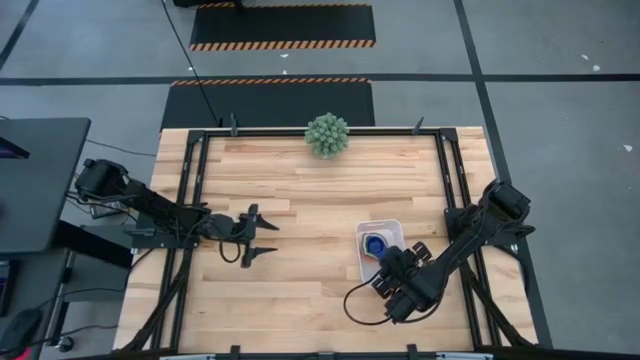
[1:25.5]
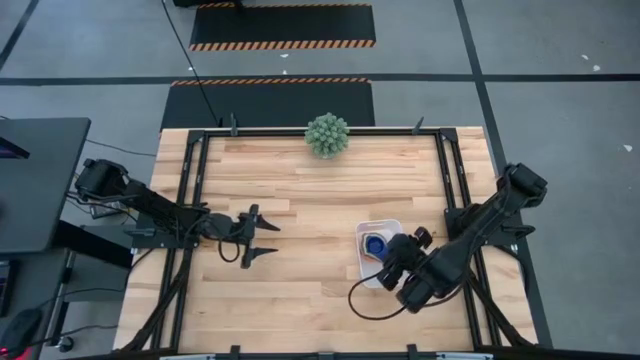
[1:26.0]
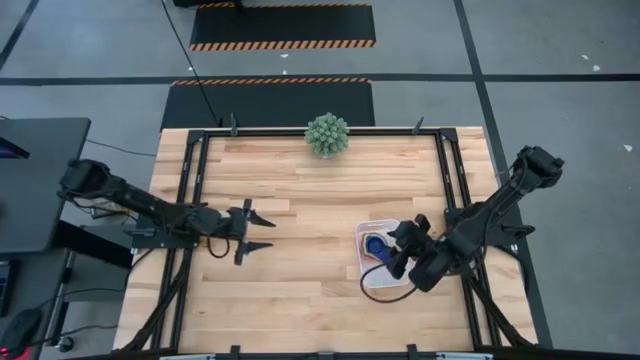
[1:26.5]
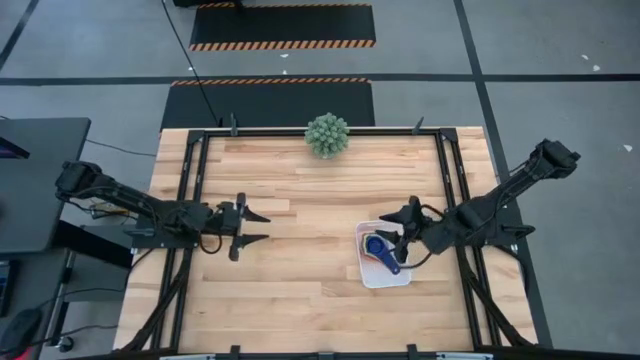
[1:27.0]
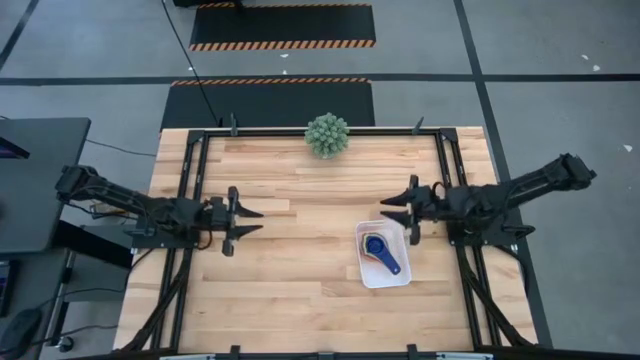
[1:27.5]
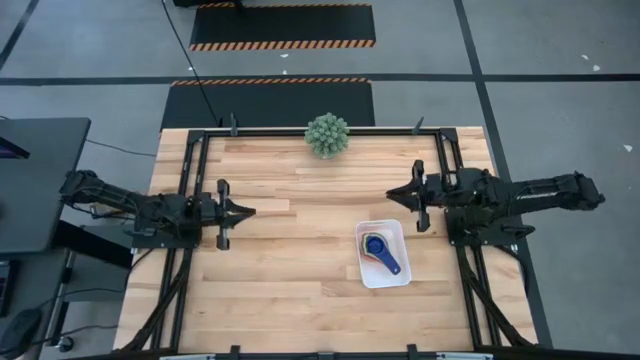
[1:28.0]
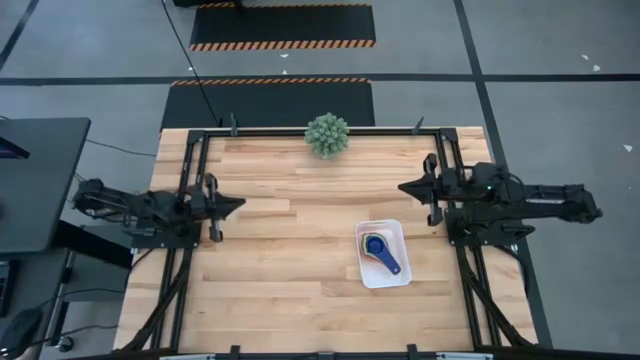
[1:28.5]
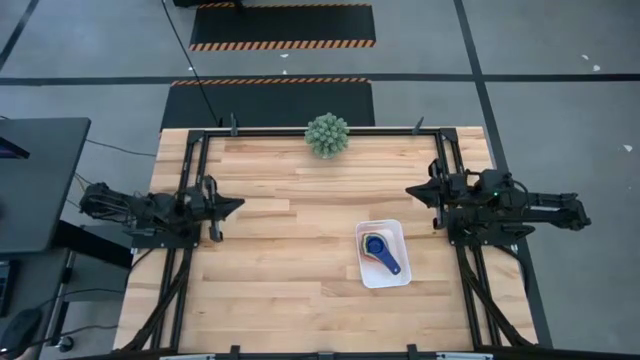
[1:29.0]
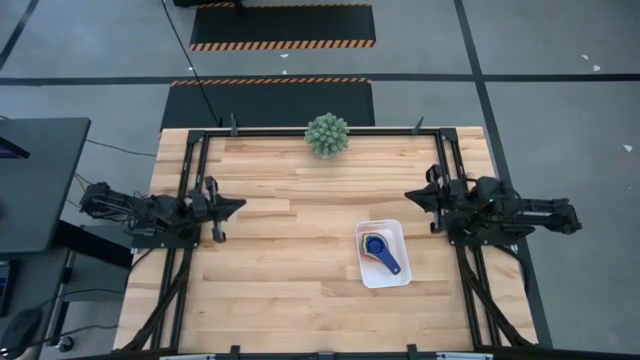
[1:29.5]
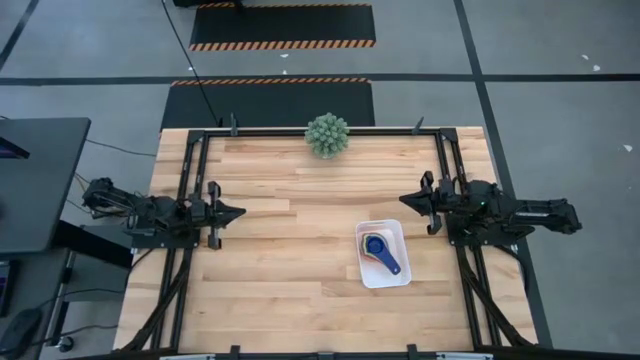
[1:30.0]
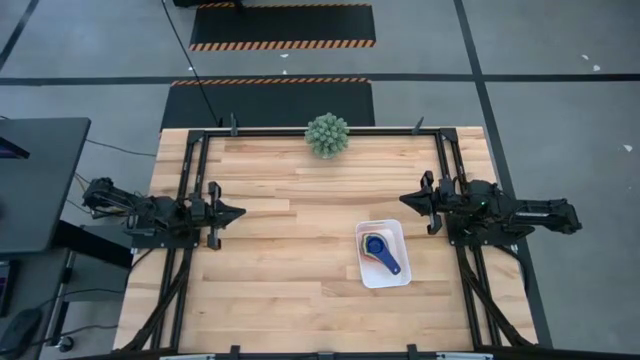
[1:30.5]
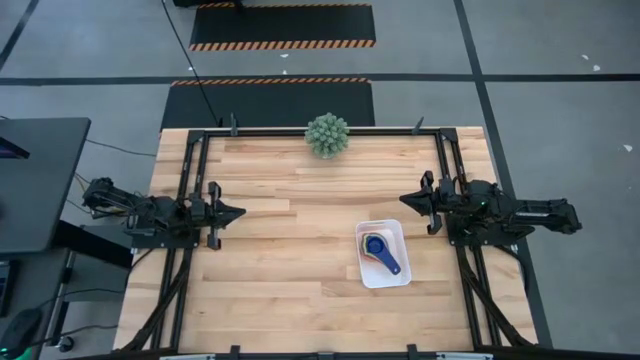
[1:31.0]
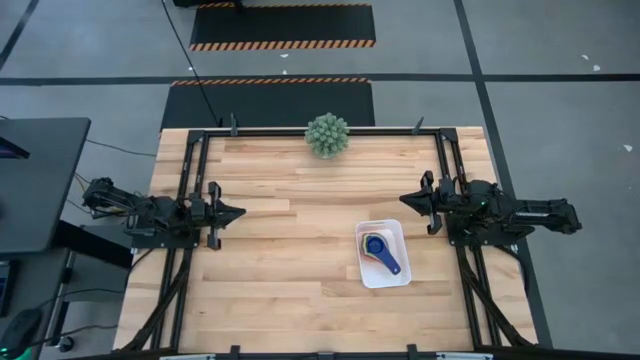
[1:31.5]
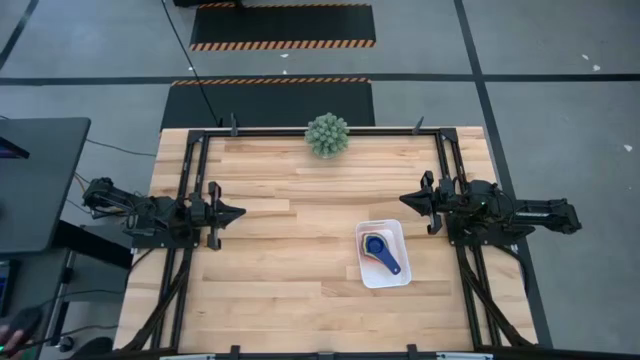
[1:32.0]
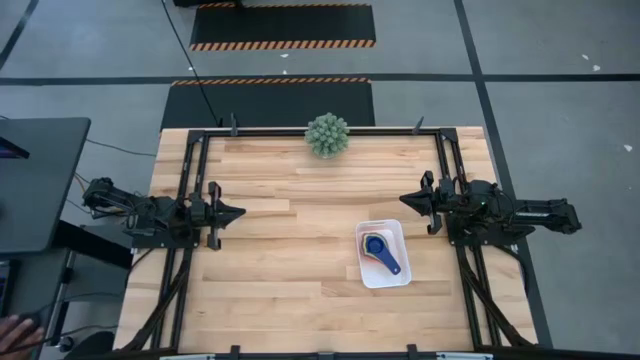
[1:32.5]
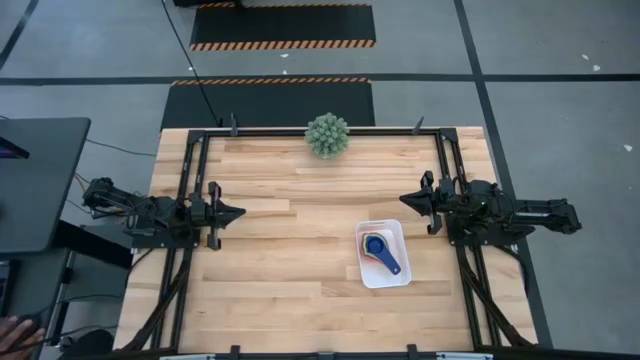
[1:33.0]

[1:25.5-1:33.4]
Task: Nest measuring cups in basket
Return to Home Position

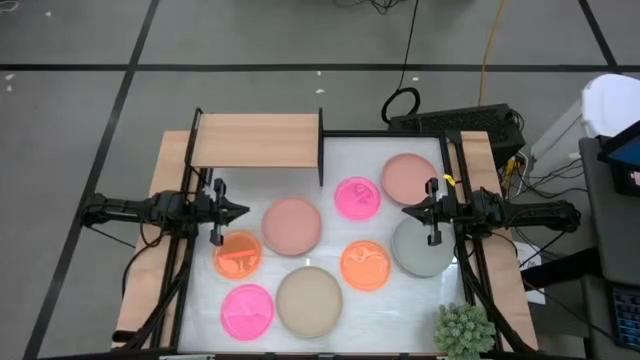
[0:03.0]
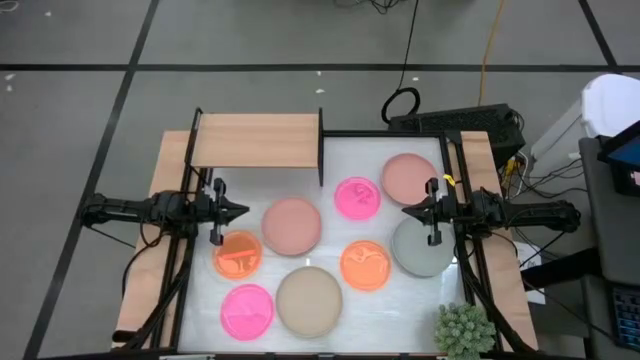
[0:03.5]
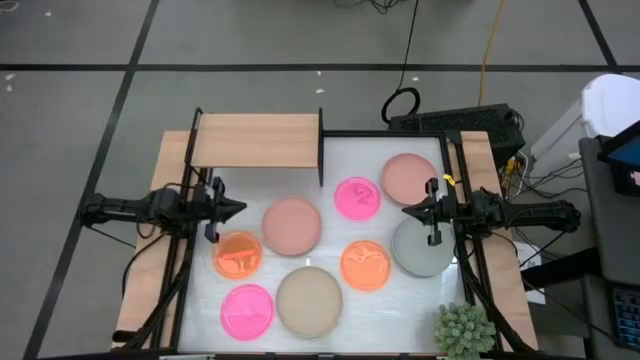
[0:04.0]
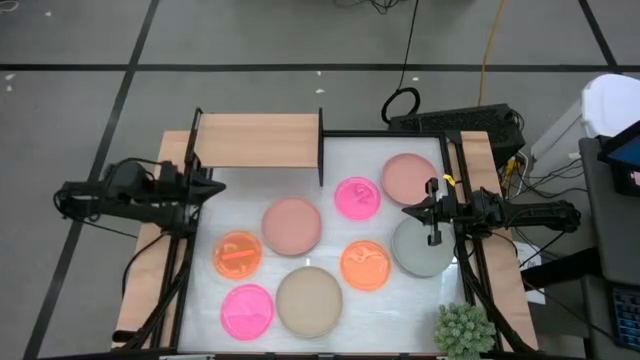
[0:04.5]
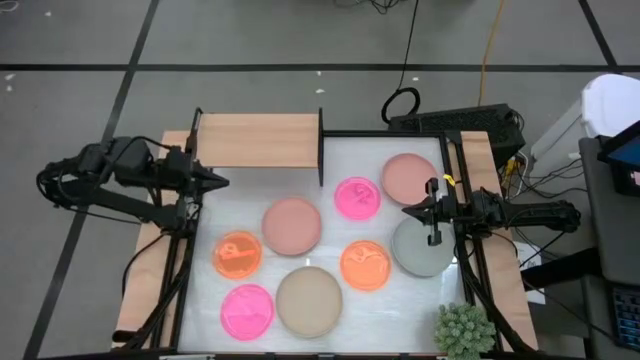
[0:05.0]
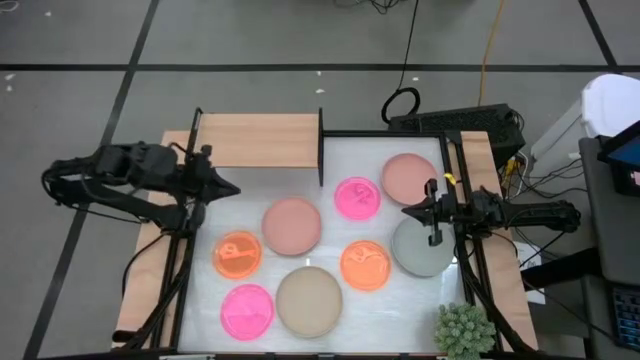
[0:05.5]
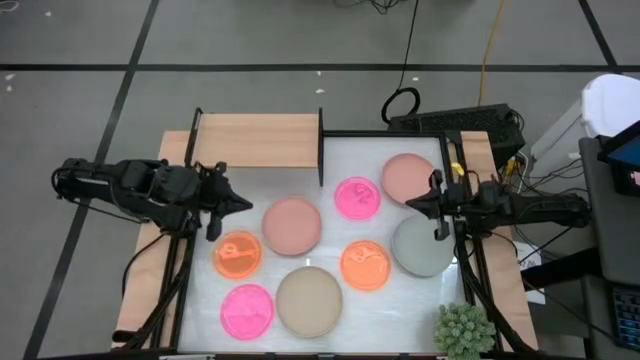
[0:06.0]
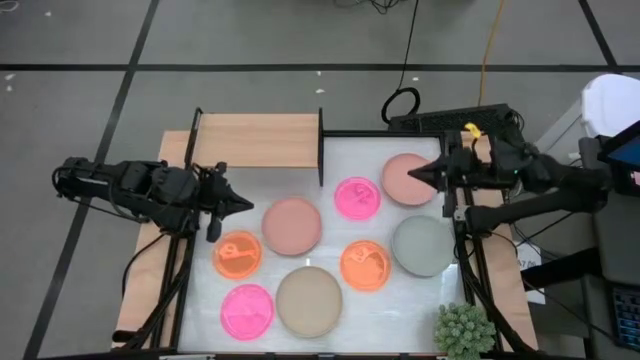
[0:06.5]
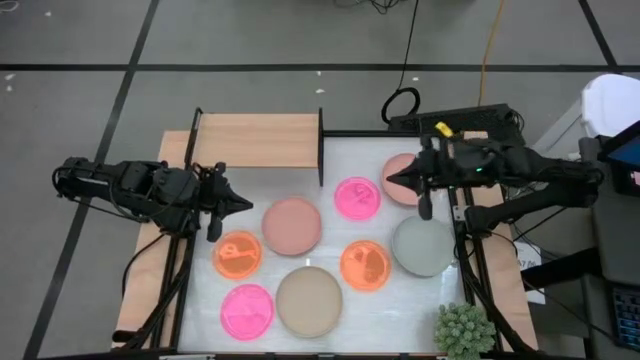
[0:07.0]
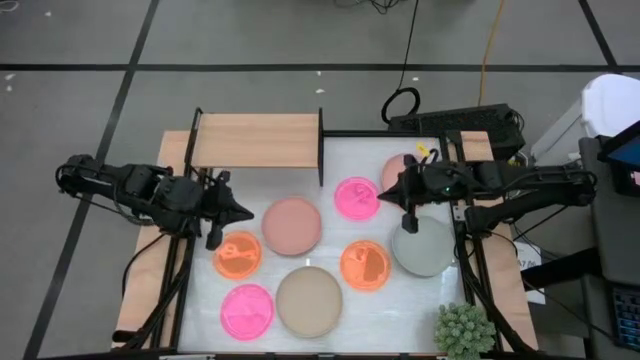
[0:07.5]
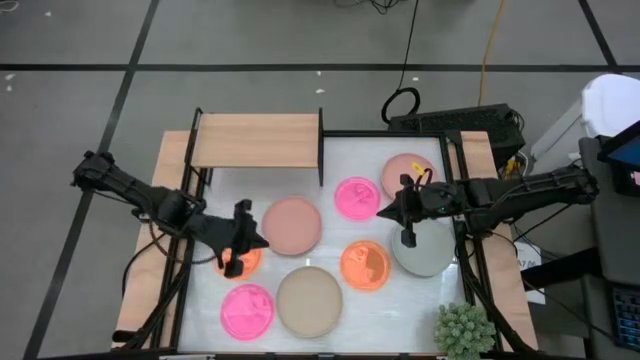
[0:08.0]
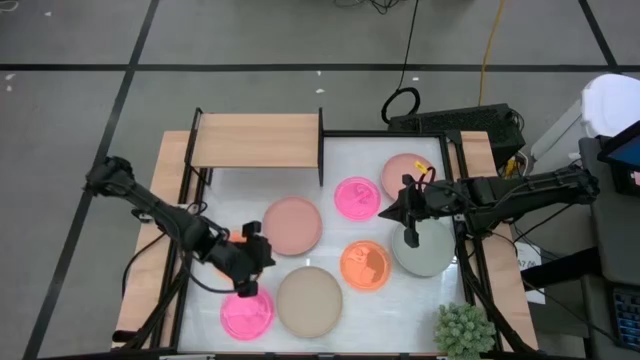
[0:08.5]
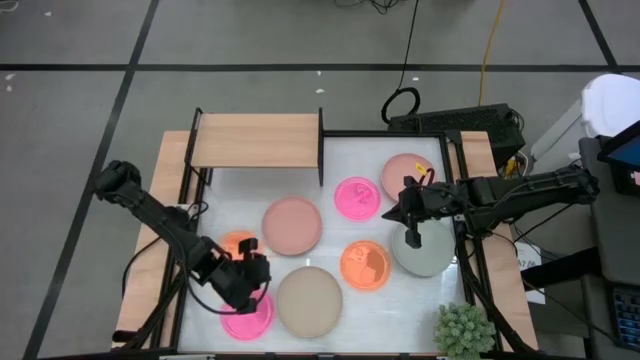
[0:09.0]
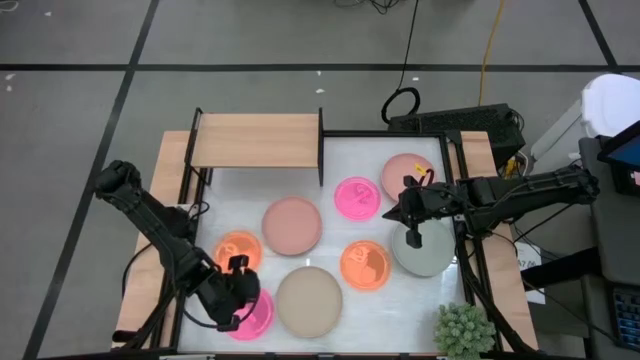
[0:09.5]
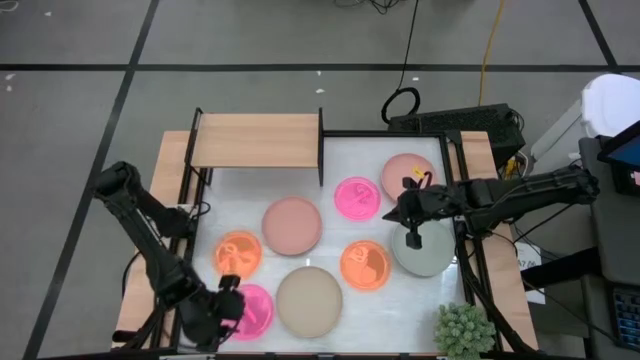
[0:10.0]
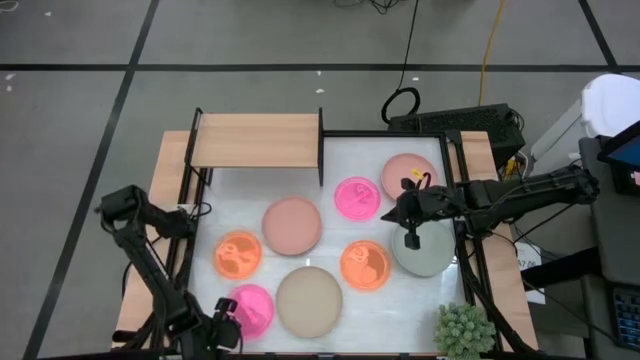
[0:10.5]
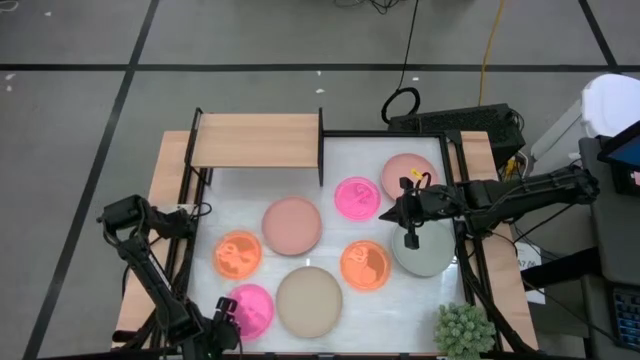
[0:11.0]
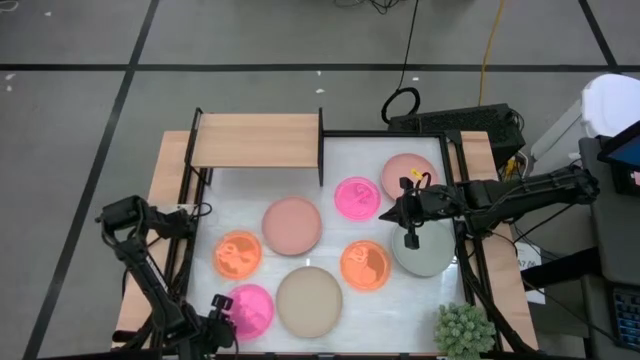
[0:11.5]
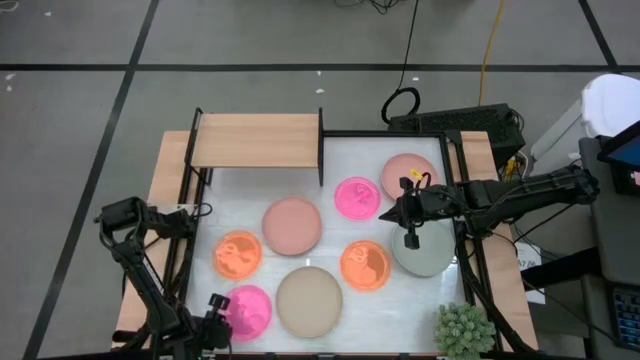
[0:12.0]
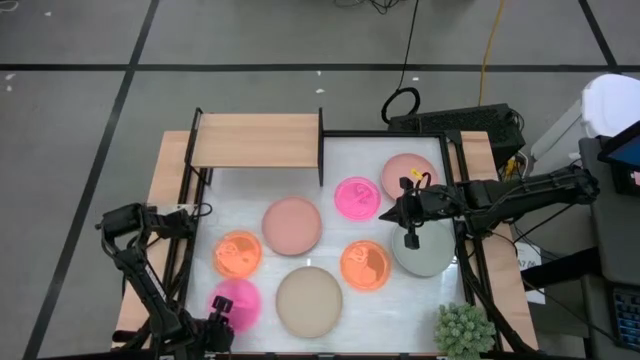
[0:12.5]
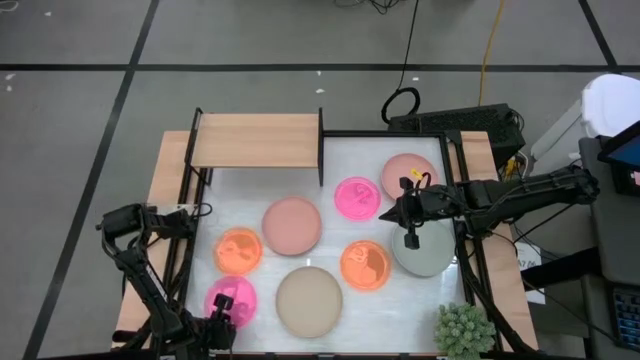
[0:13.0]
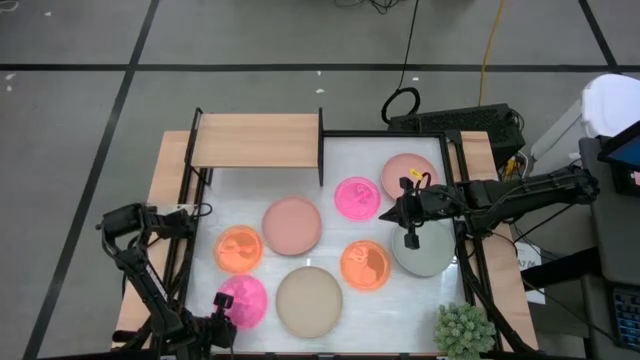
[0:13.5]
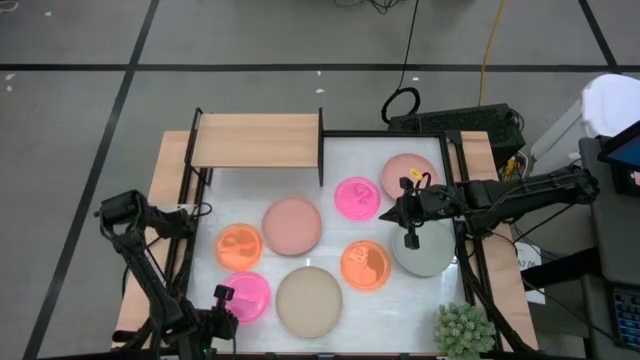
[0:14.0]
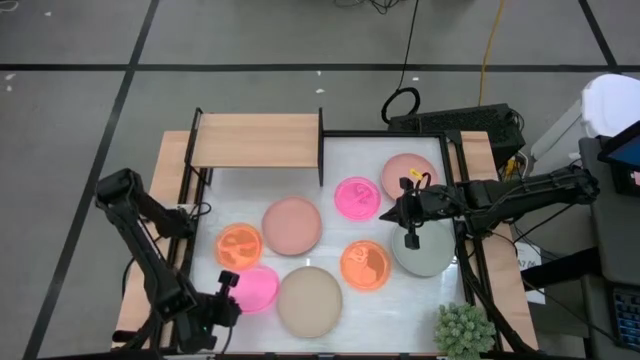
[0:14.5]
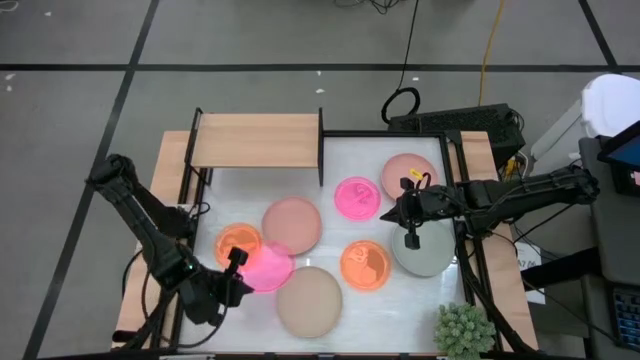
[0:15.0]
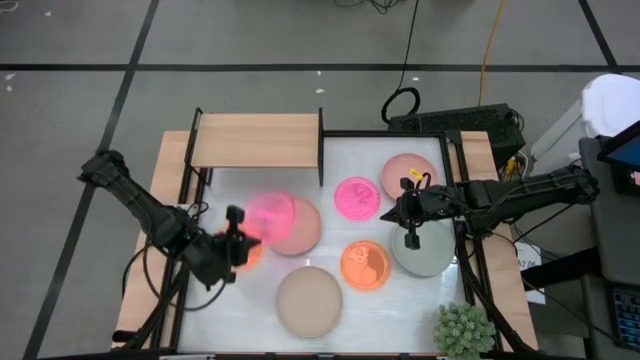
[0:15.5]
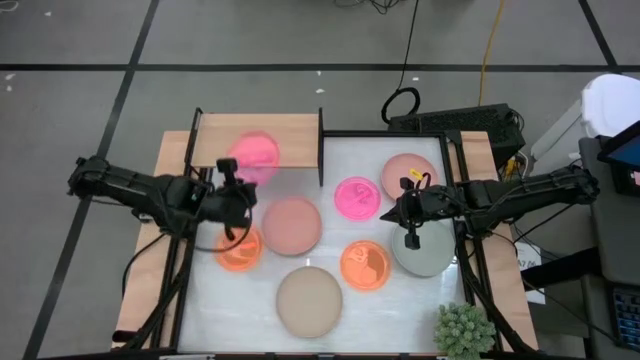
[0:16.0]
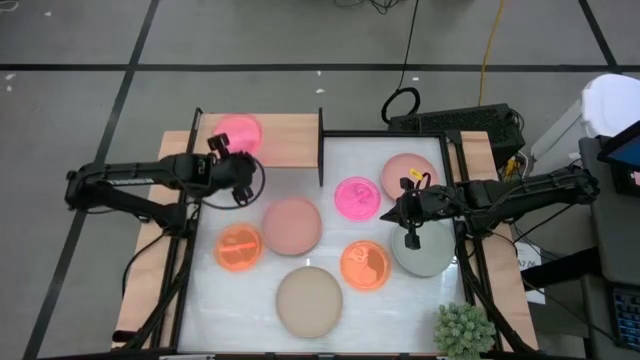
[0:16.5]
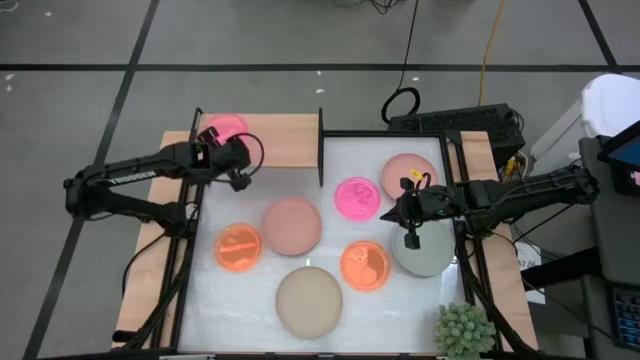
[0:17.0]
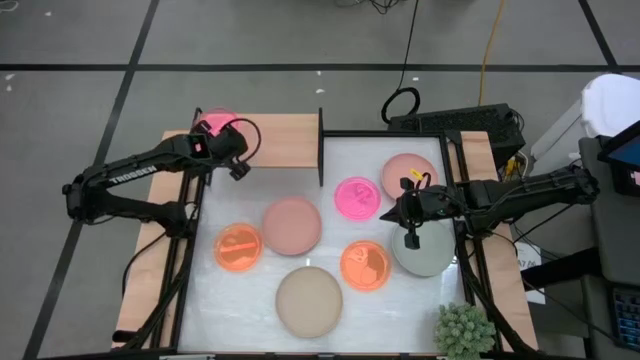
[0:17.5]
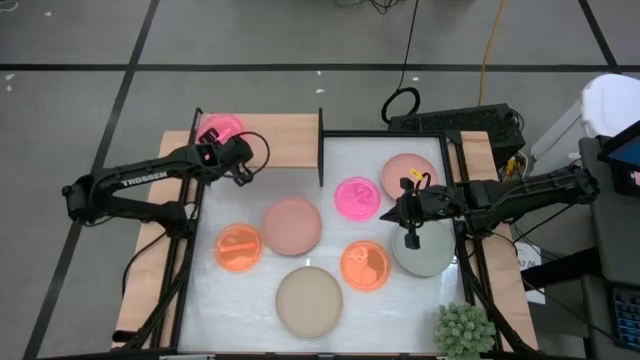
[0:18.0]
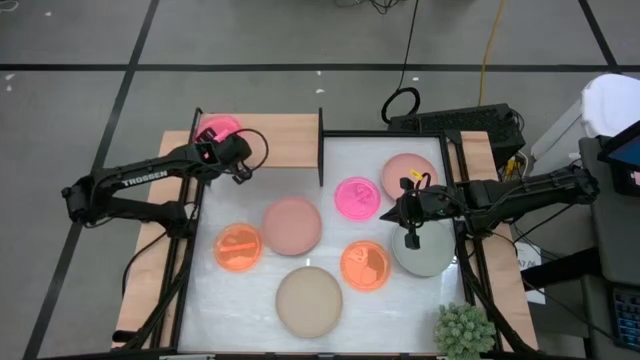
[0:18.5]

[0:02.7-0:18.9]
Task: Place and stack plates onto a shelf
Put the bottom small pink plate on the shelf
